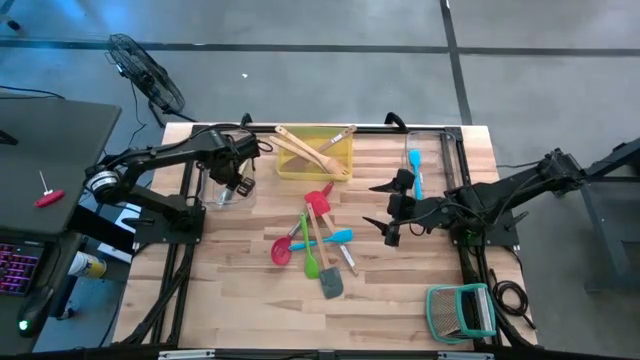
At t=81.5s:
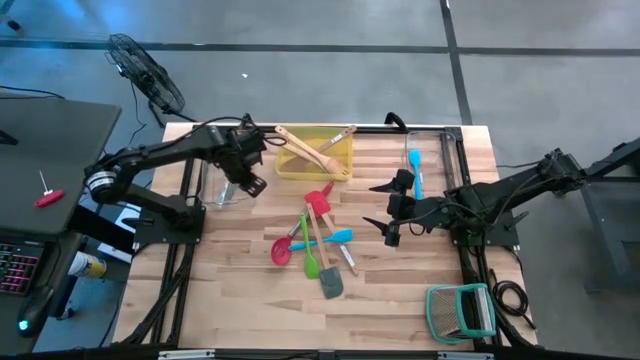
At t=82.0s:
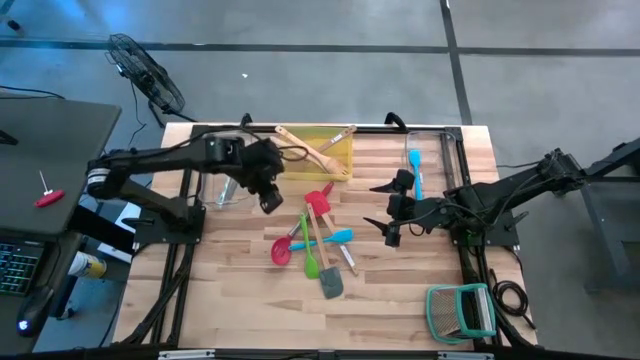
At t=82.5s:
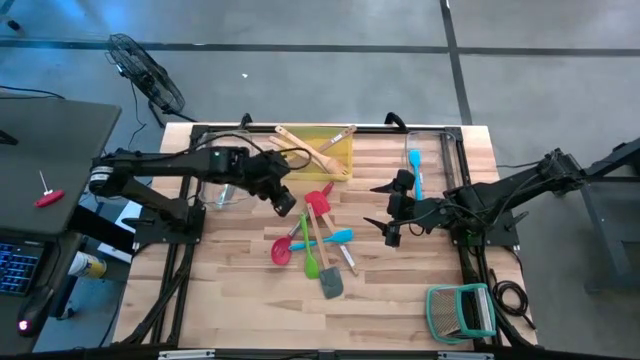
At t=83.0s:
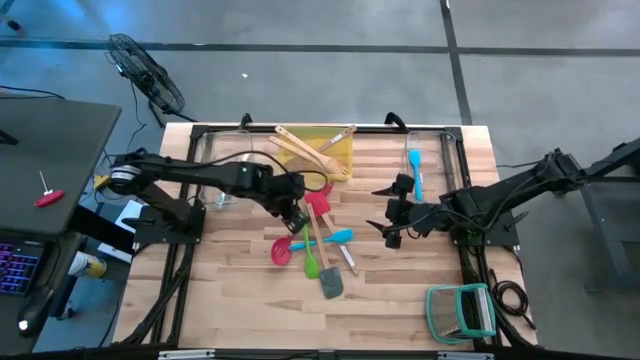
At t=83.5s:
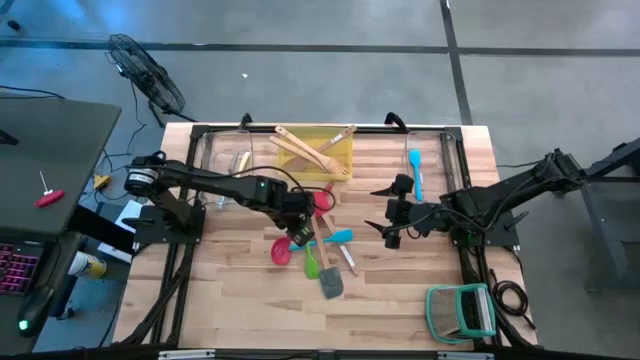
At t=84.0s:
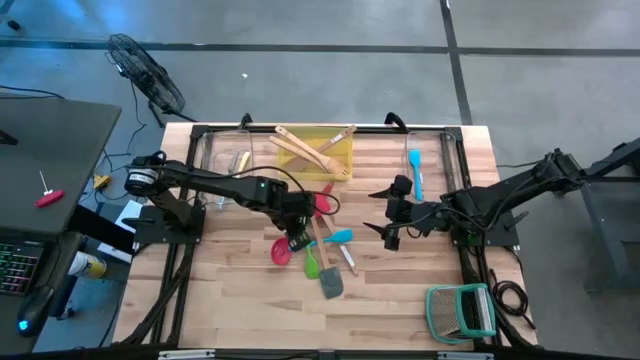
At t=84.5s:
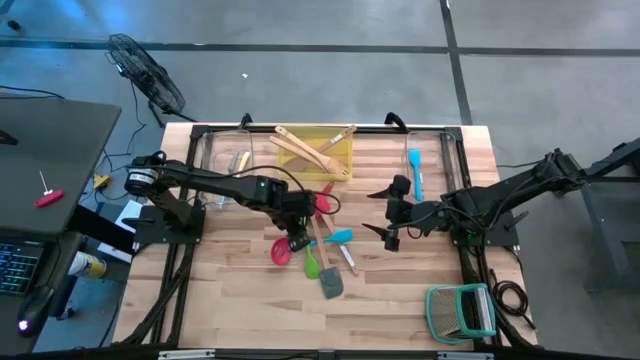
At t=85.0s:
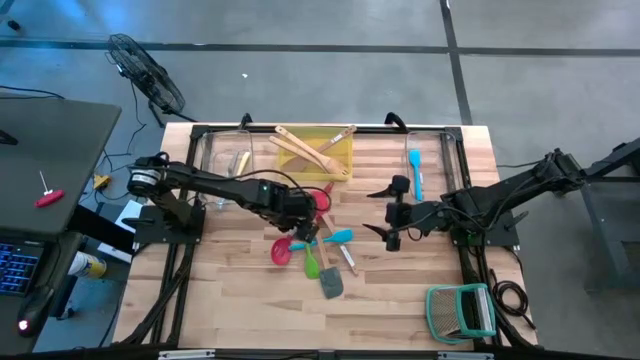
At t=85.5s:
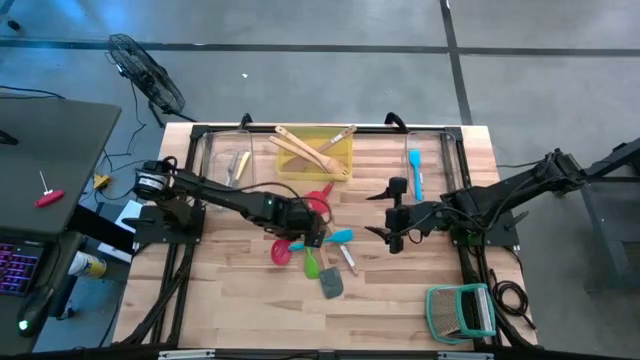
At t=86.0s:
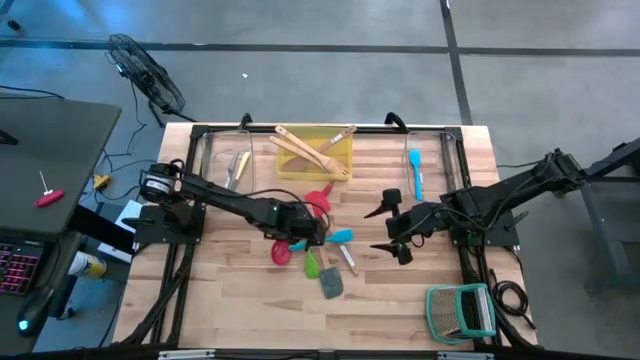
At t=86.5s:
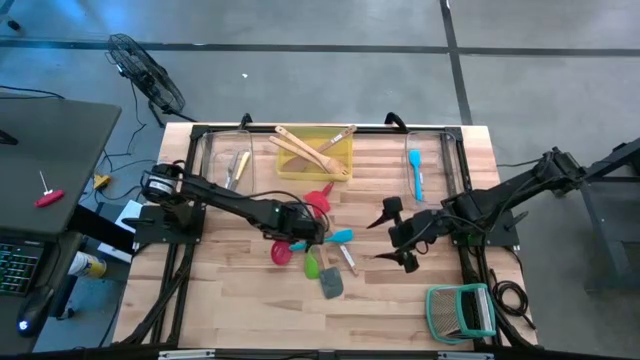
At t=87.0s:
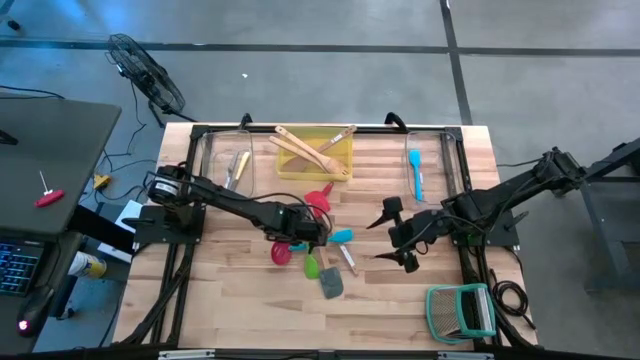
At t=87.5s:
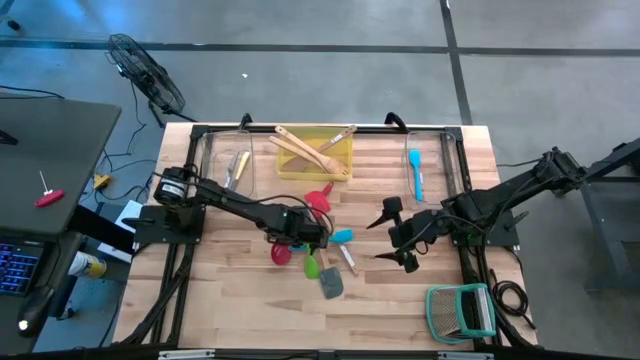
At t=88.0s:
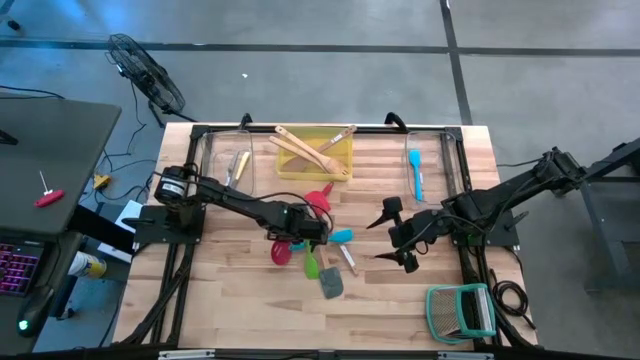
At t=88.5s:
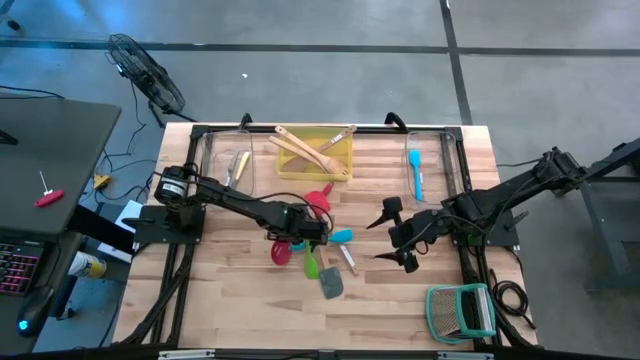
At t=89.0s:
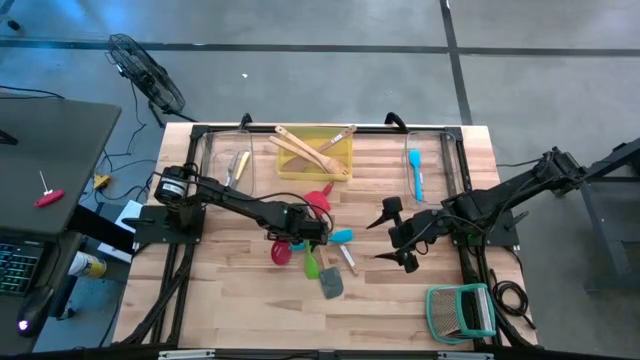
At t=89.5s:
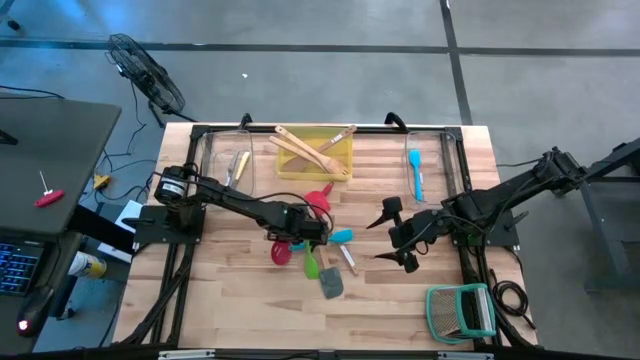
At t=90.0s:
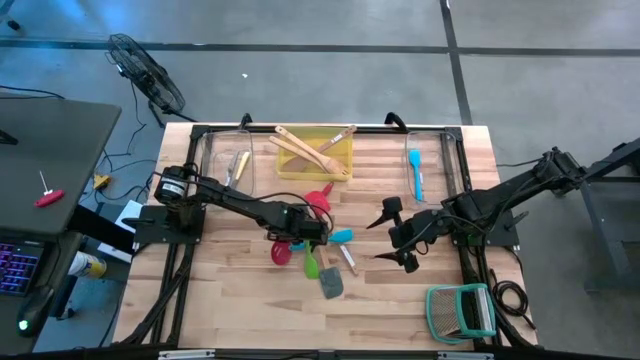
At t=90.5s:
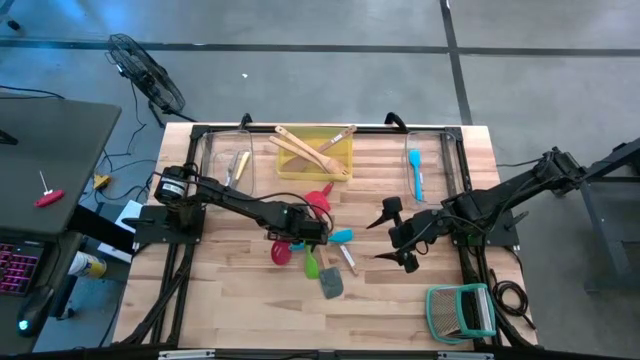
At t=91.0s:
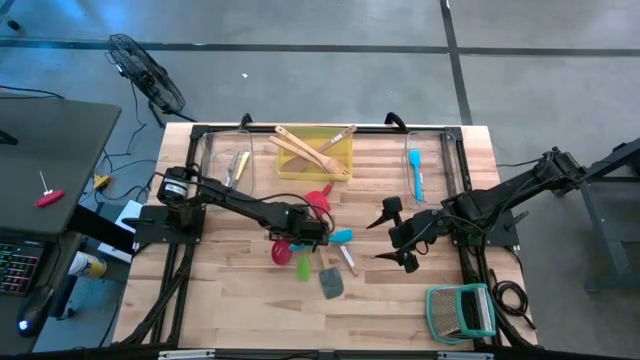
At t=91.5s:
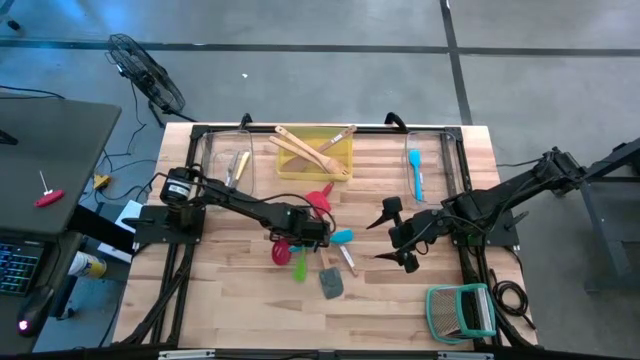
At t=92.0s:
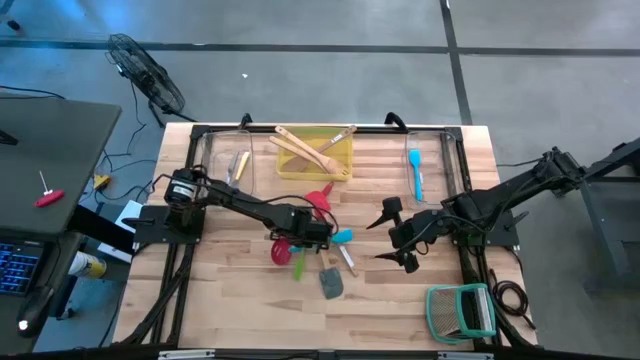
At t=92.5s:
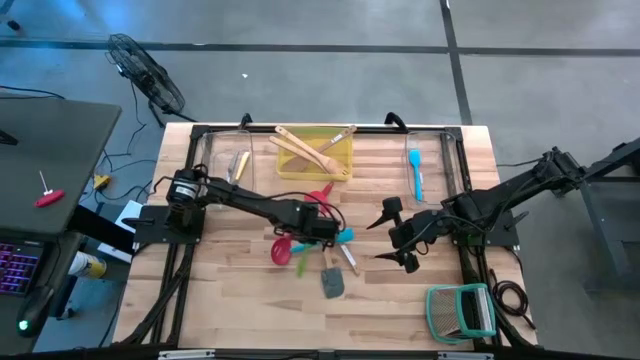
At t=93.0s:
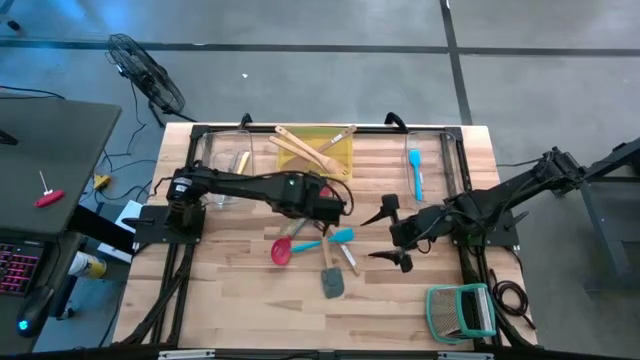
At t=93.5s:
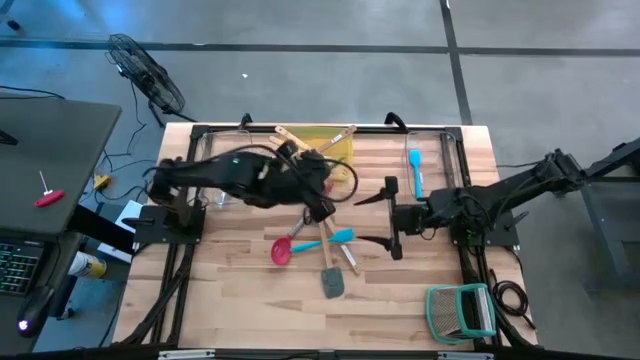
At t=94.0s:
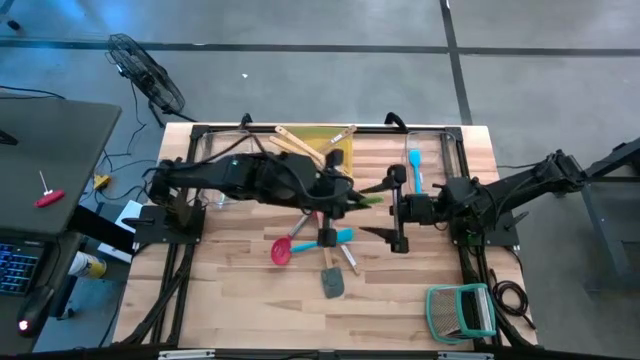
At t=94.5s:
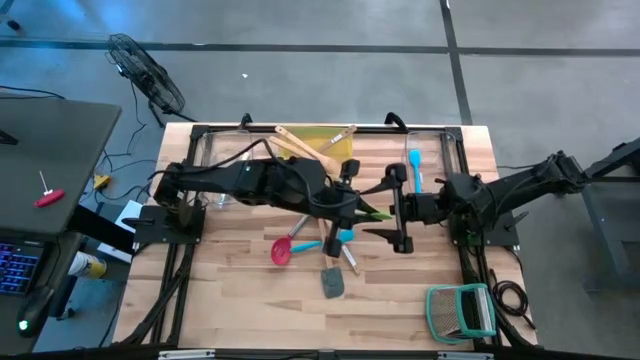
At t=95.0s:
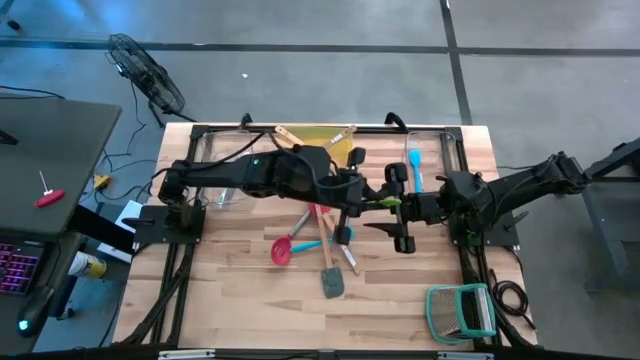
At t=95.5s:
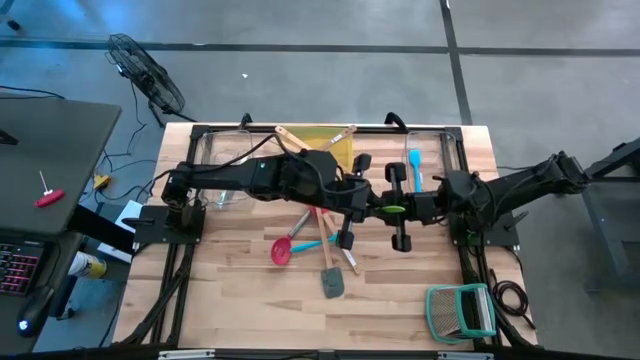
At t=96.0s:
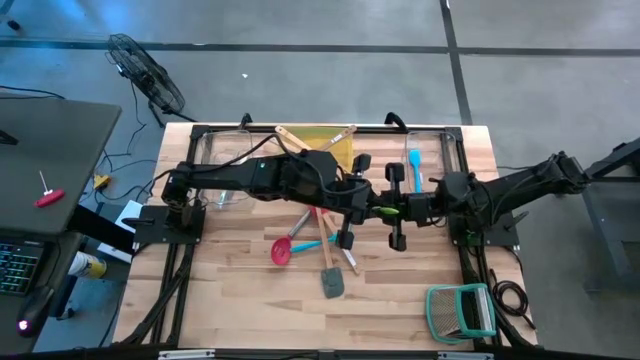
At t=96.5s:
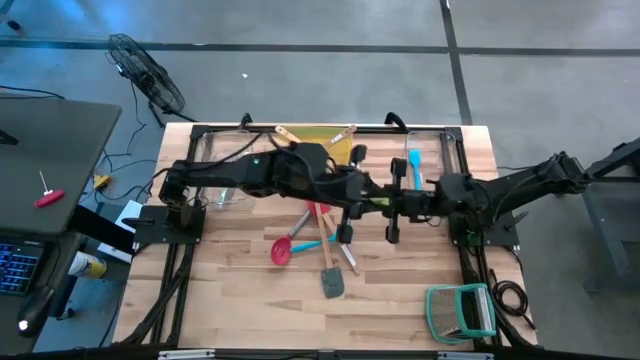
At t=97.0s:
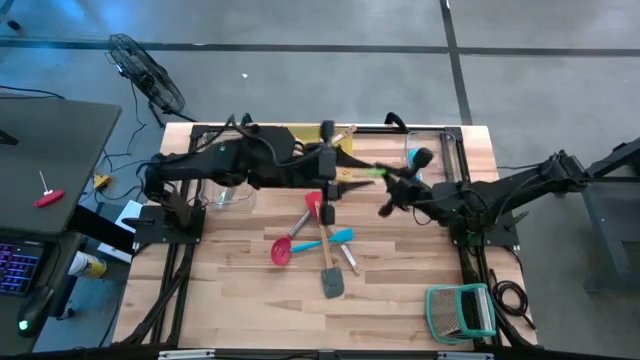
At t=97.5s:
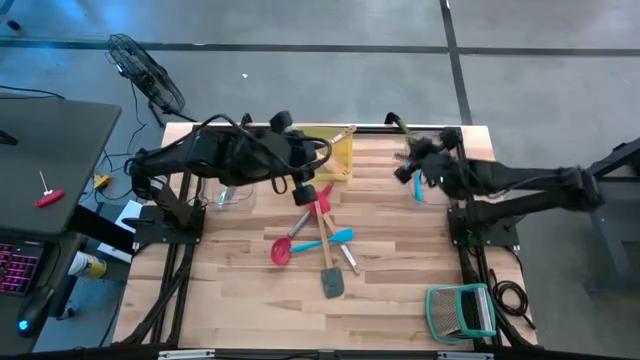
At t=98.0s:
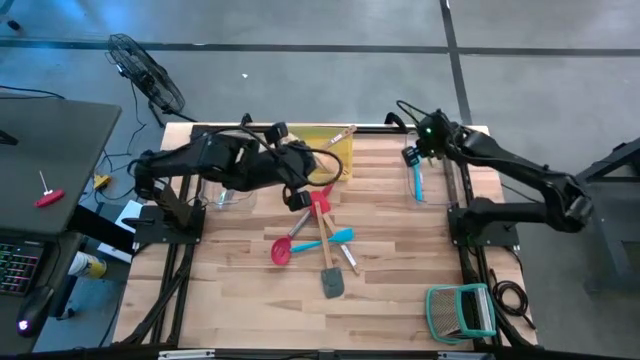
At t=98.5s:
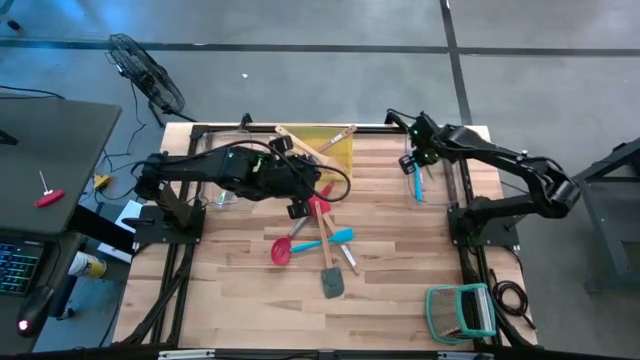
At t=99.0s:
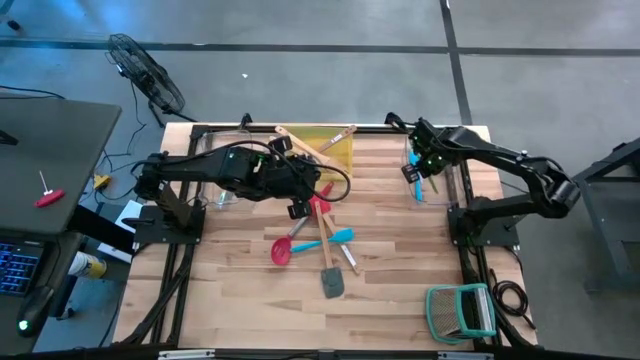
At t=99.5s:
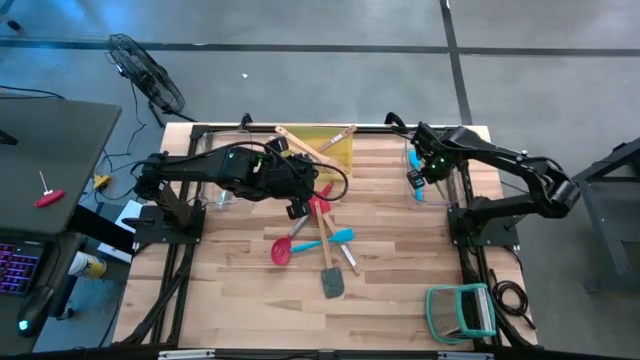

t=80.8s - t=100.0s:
Task: Pick & Place Kitchen Items
Put the green spatula into the right transparent bin

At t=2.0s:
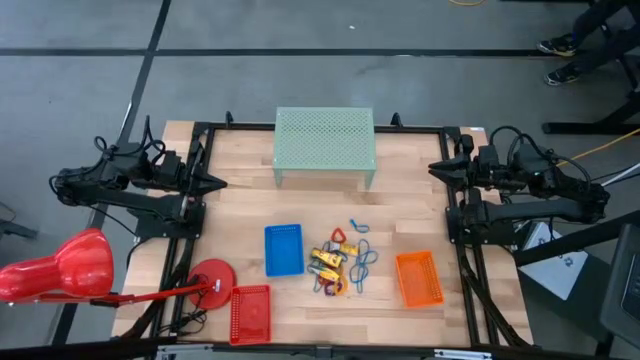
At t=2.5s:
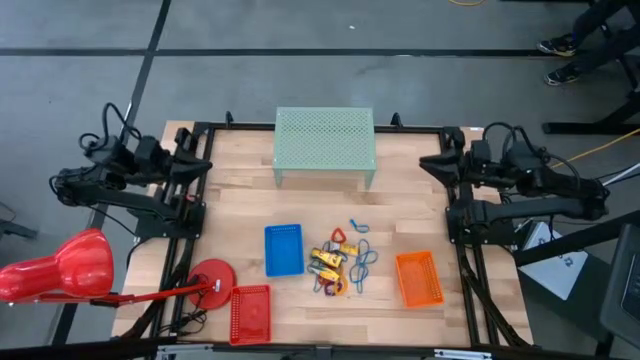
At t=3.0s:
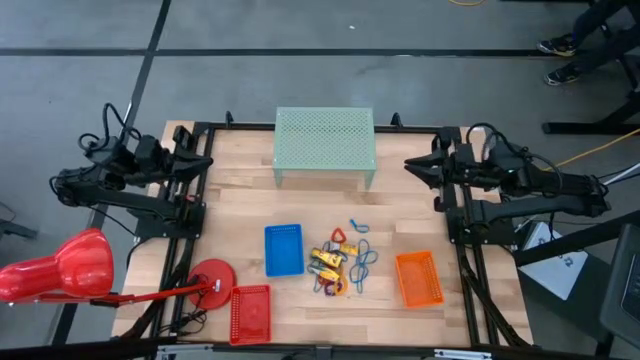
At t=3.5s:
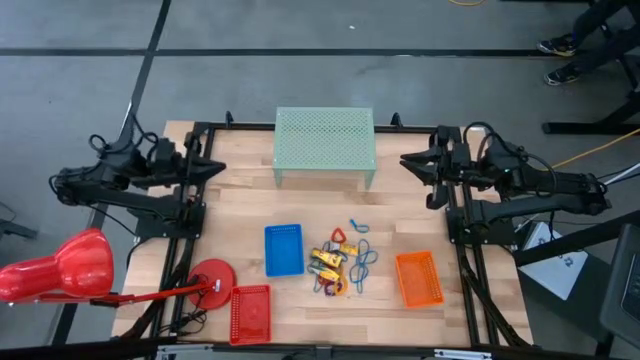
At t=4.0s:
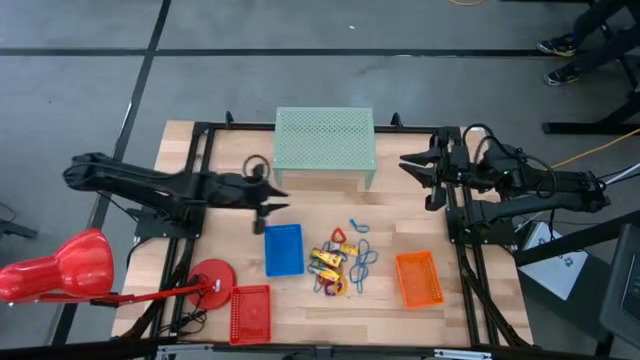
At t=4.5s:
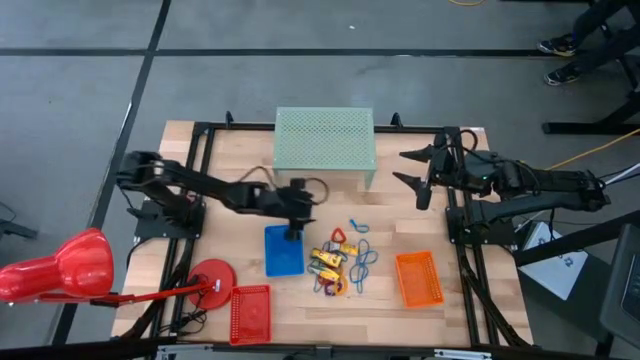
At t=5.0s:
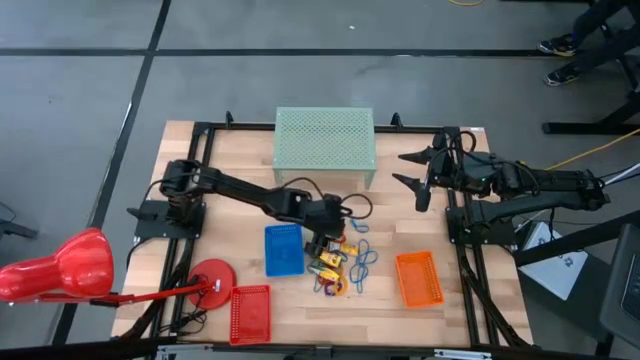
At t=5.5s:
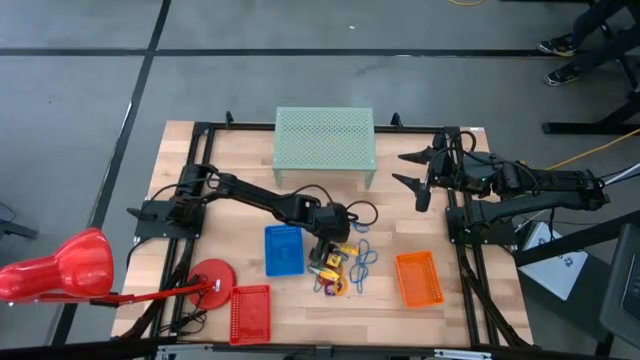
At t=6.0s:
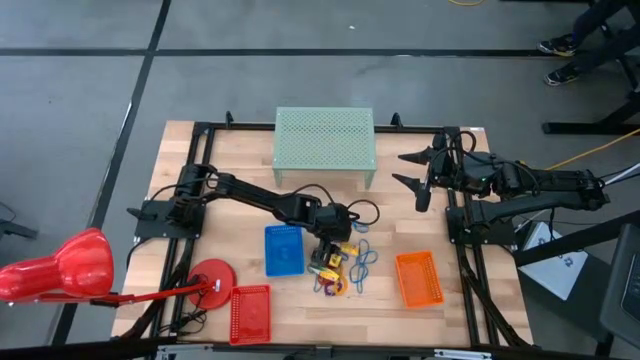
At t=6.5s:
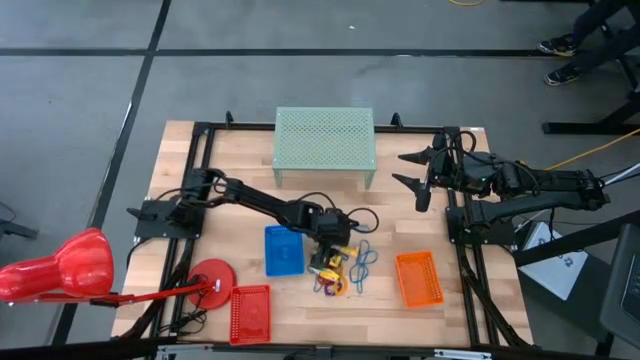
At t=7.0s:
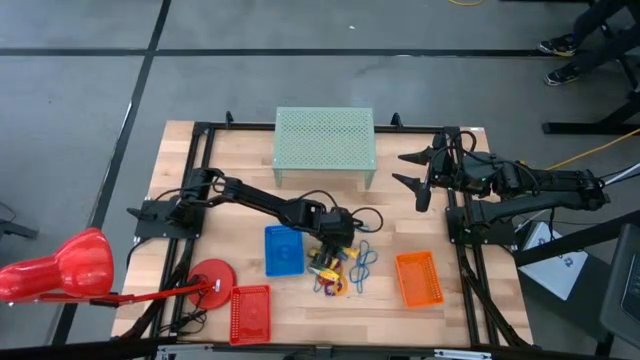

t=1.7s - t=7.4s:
Task: Pick & Place Office Desk Supplies
Put the top yellow box of crayons into the blue bin
